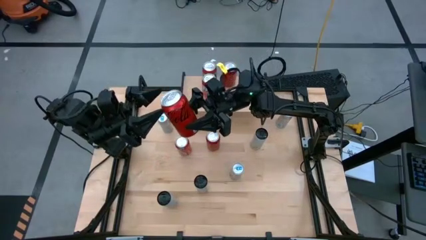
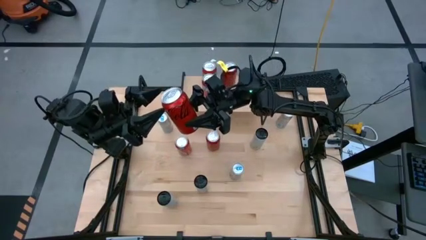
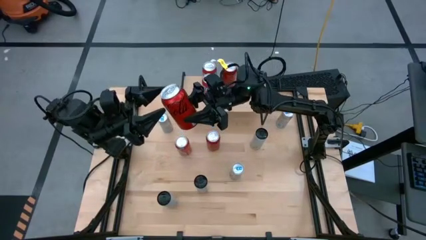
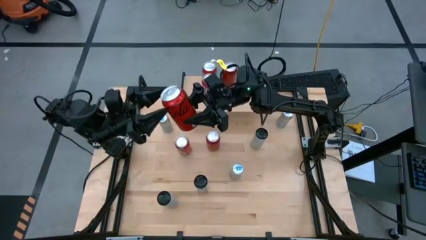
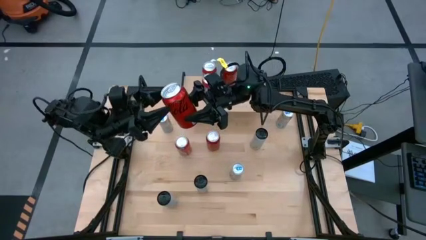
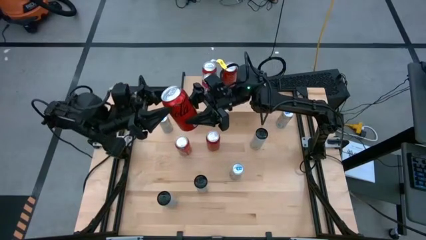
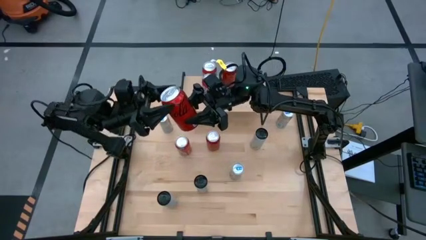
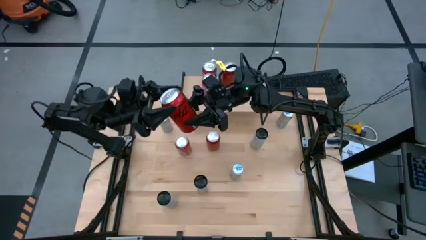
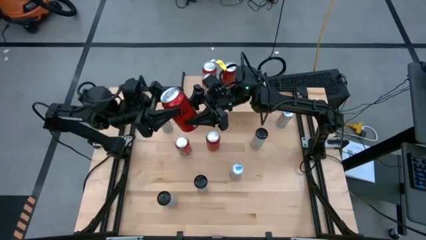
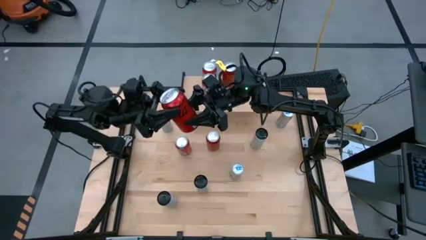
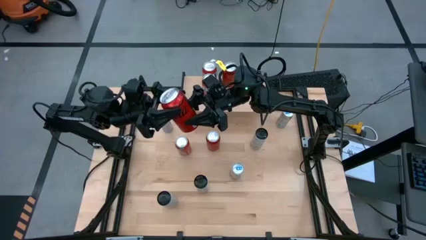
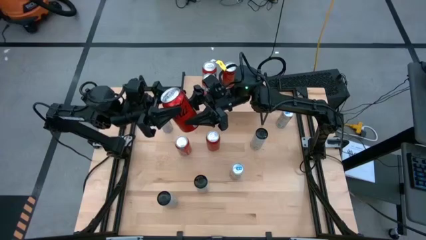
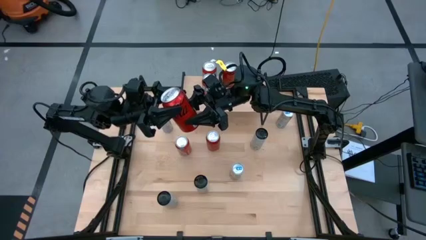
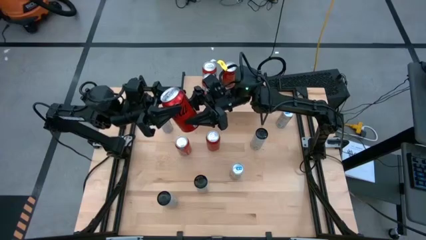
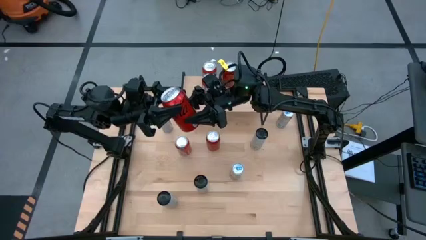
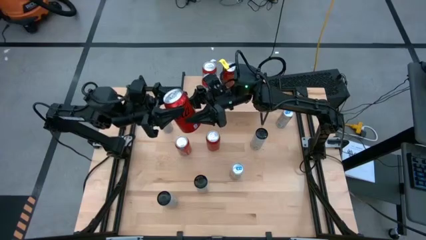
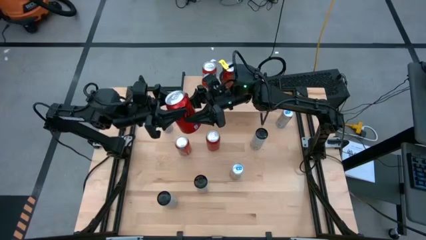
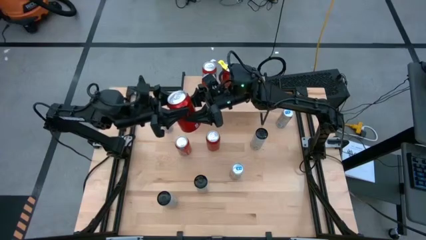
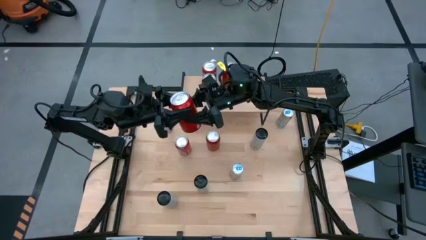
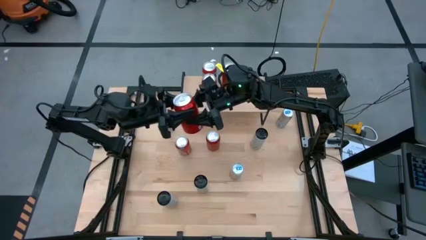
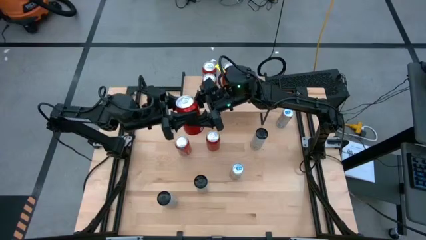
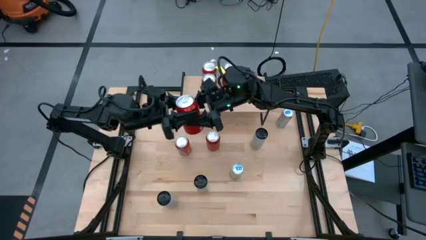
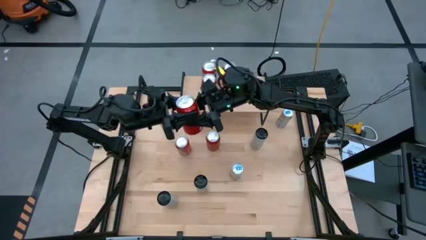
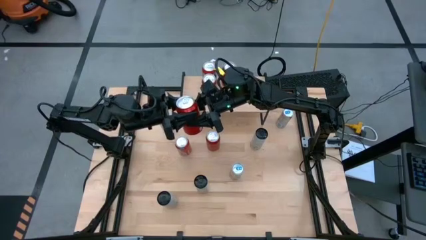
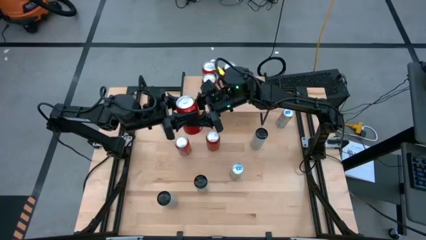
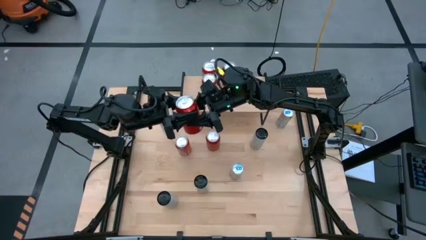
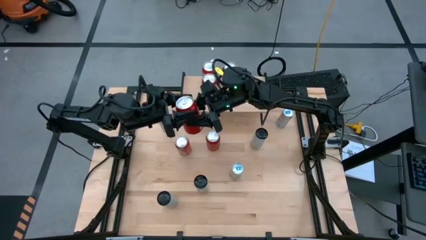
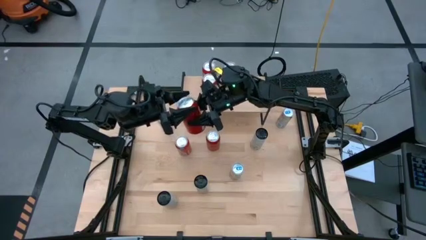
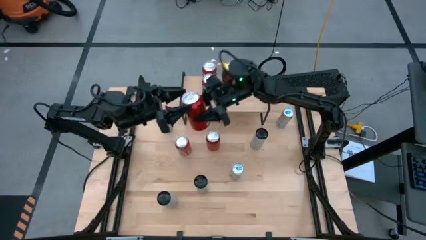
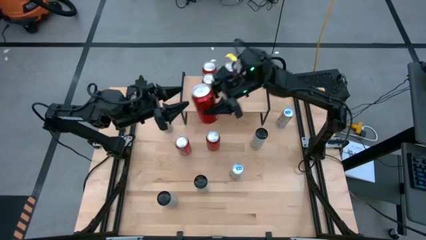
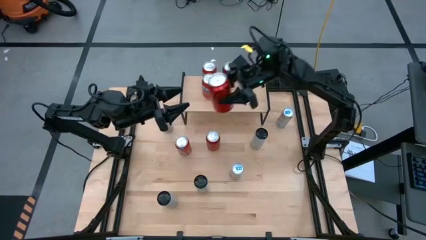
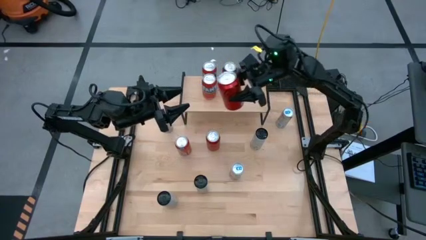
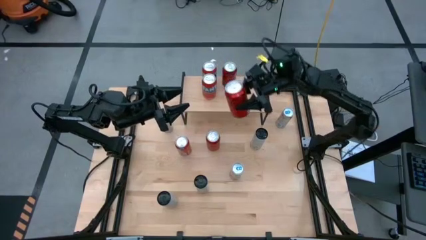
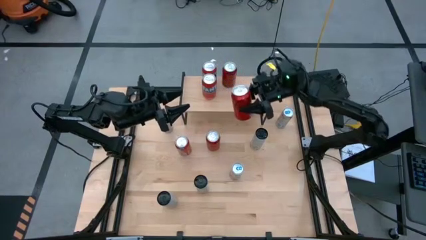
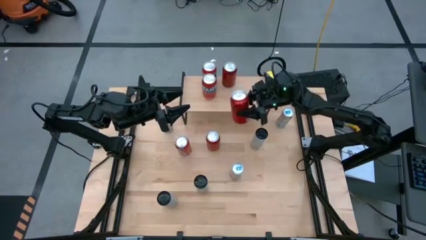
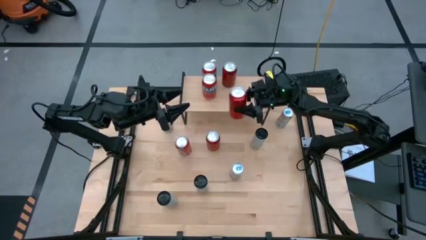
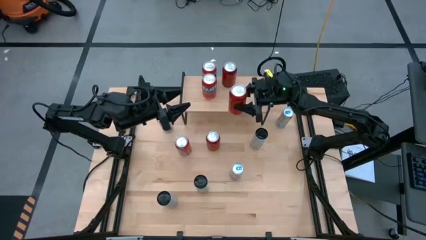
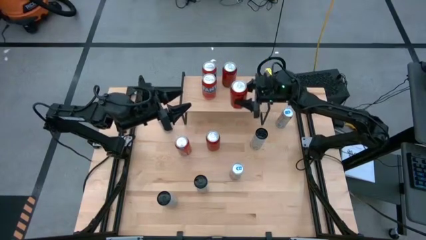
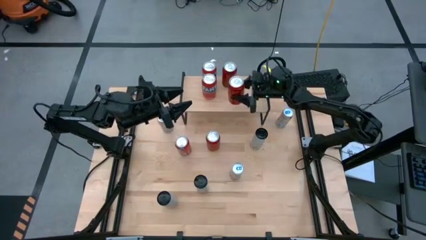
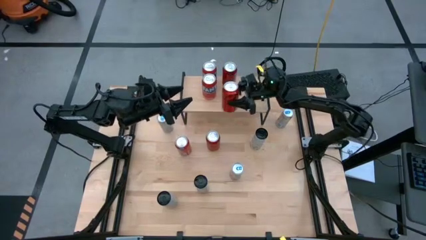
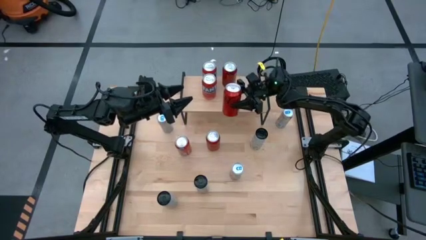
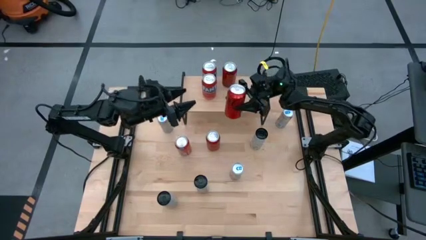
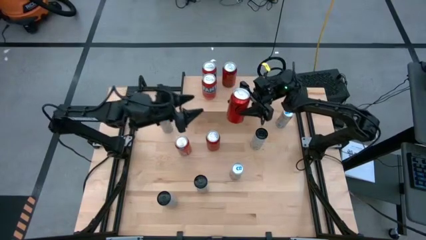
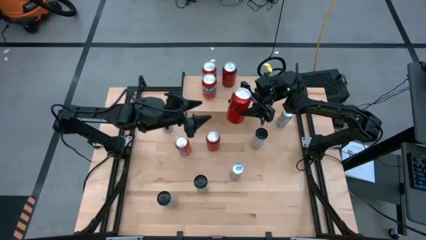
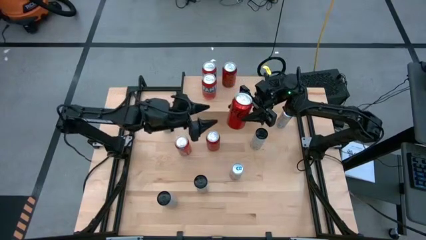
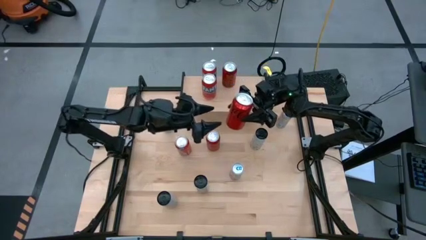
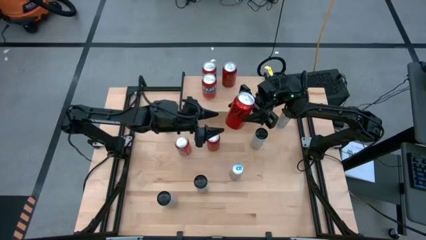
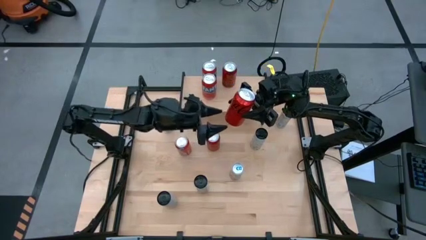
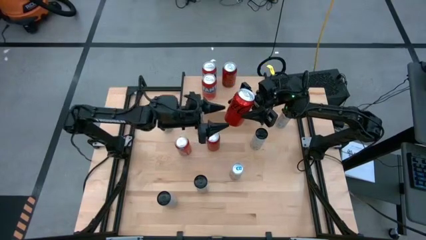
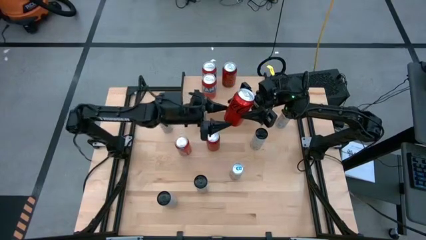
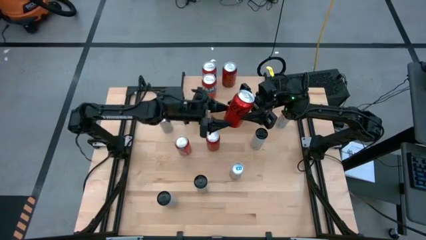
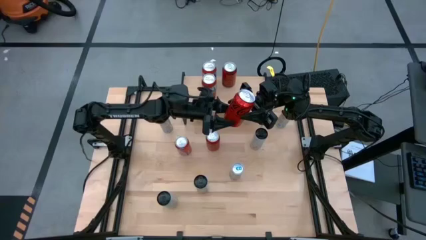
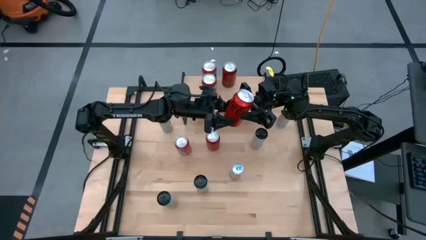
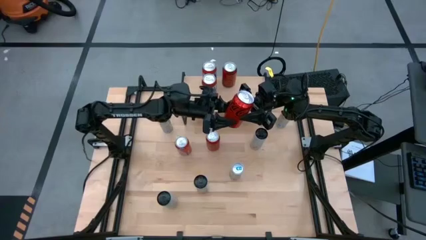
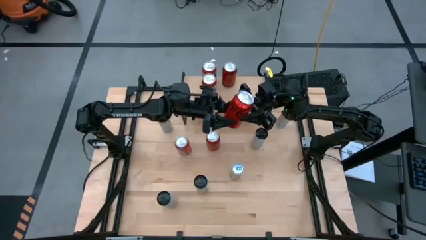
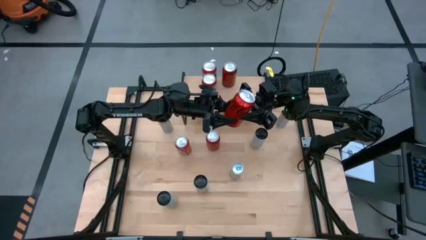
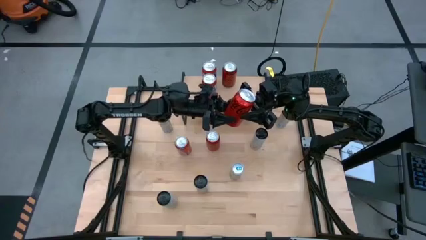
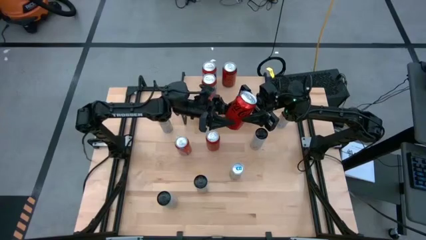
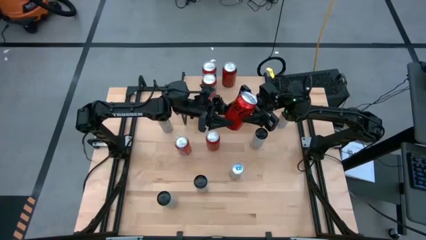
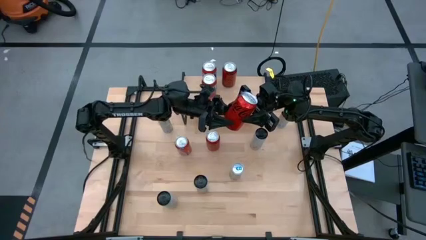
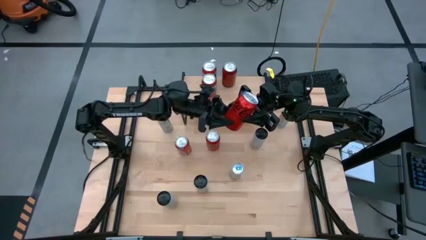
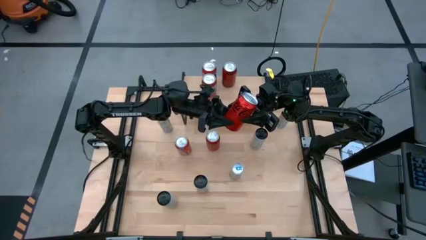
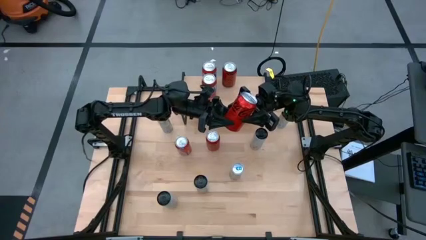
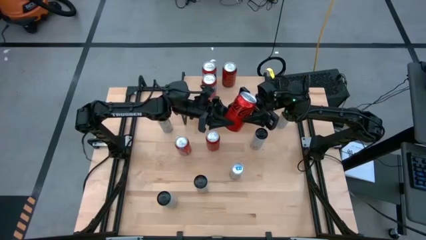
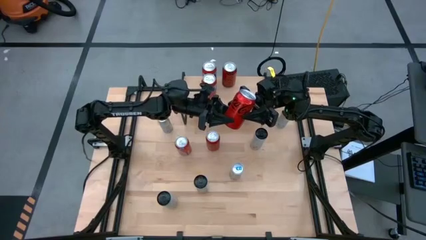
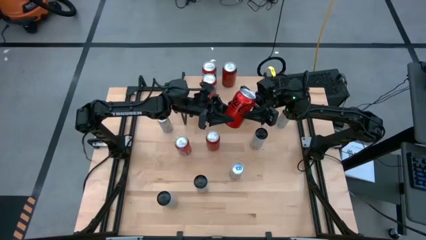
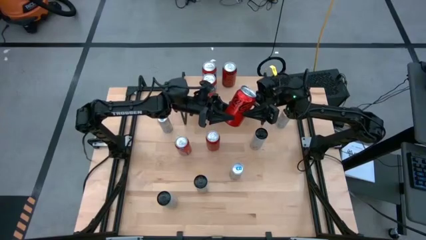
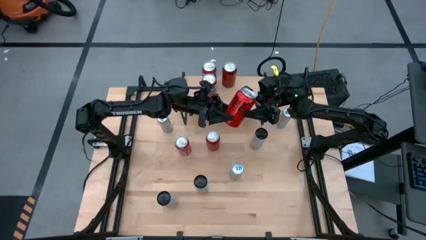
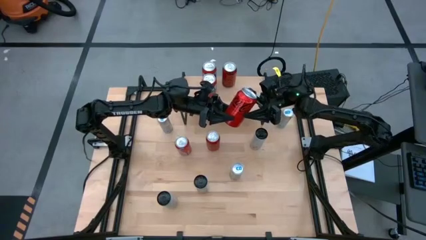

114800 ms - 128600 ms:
Task: Place canned beverage on shelf
Put the bottom red-black soda can on the shelf aligned with the other red-black soda can

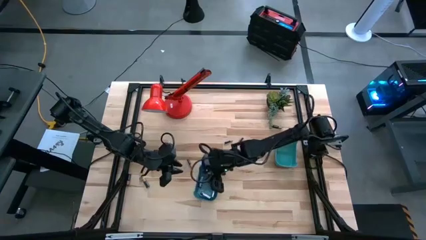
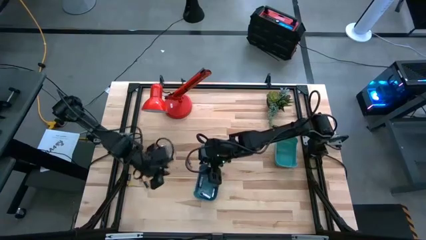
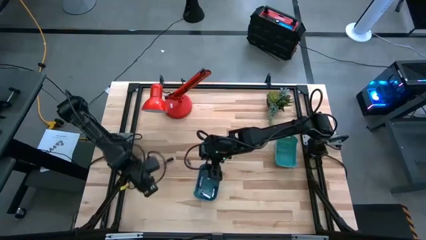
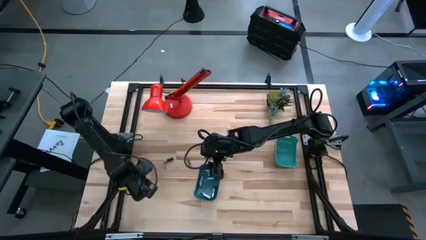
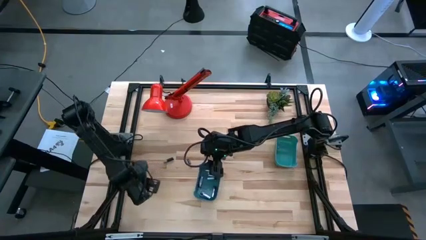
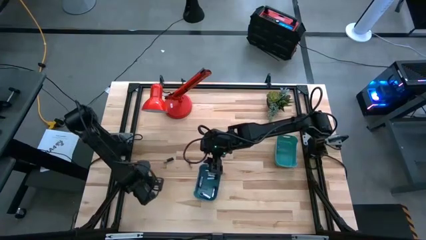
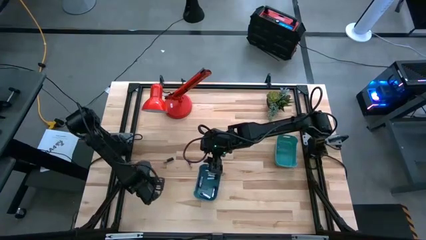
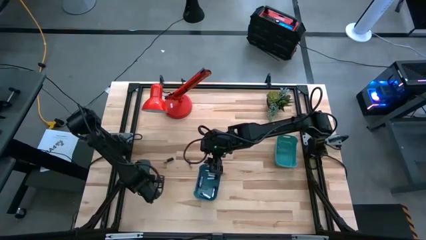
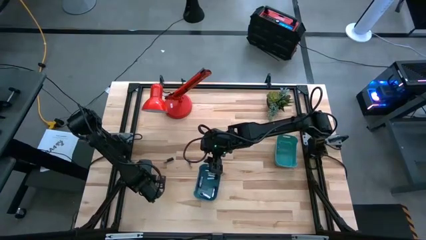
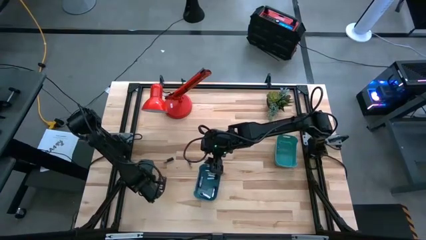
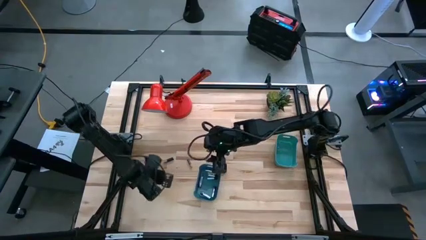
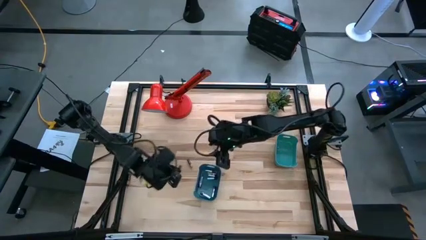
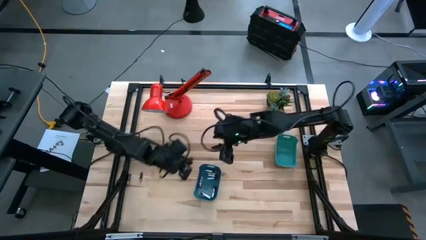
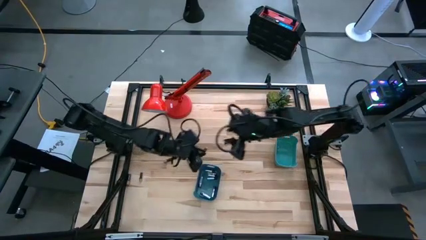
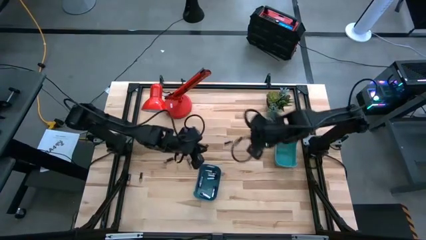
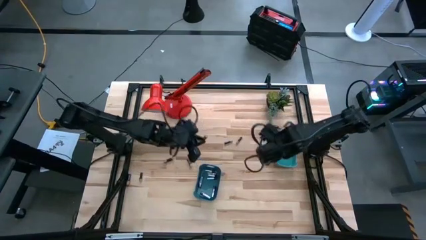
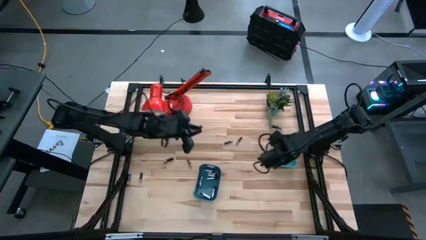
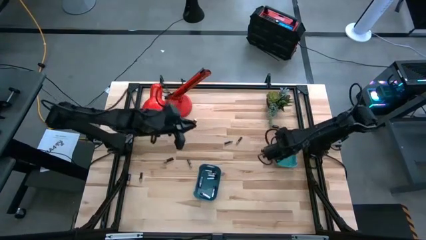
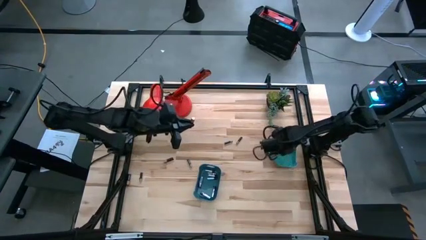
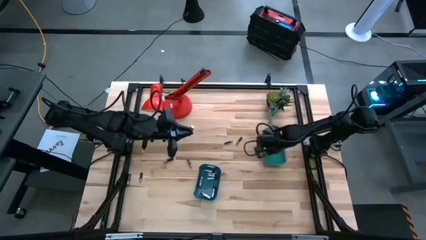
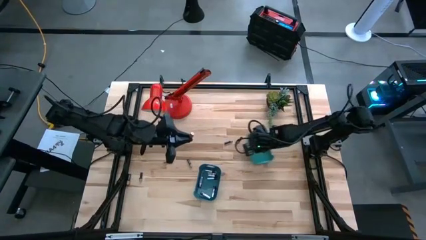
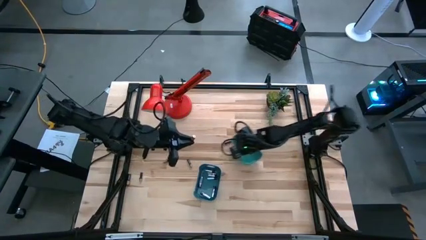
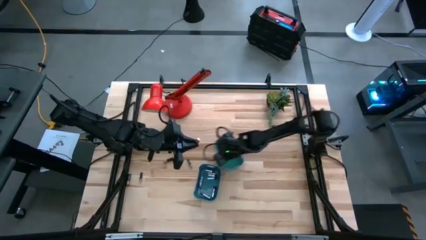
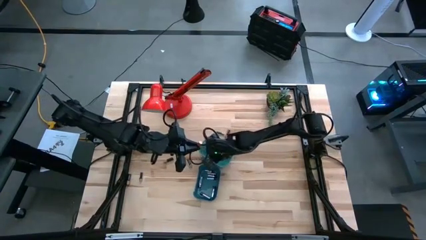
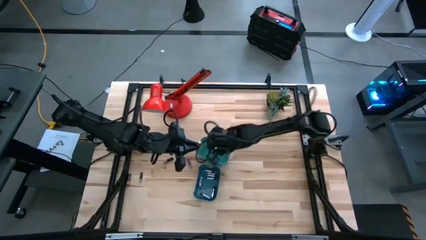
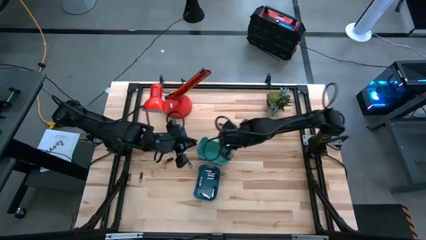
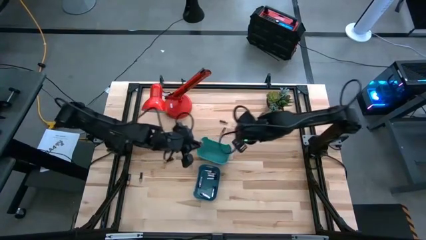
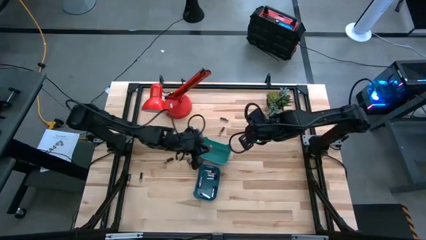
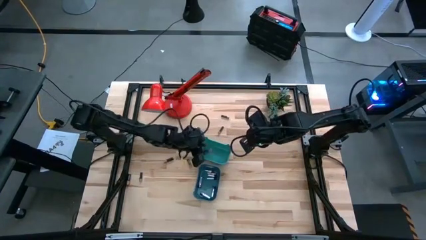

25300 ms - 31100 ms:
Task: Sort batteries
Put the black battery into the light blue bin
